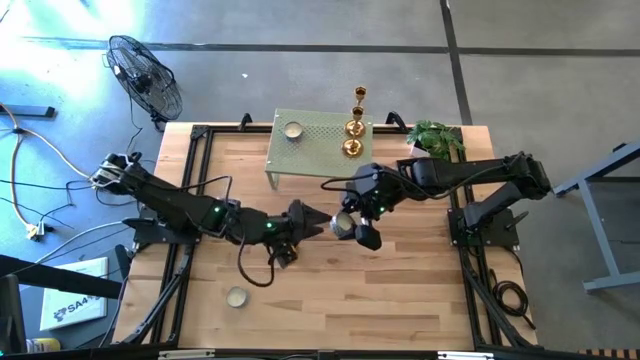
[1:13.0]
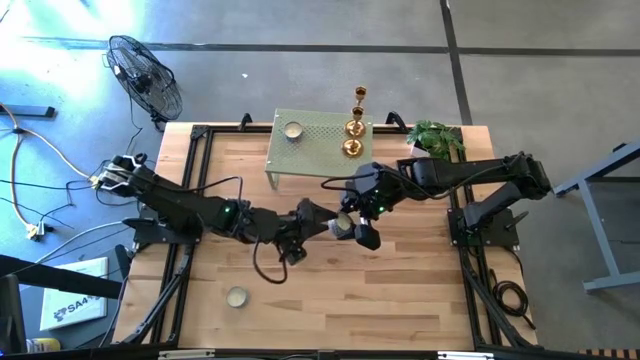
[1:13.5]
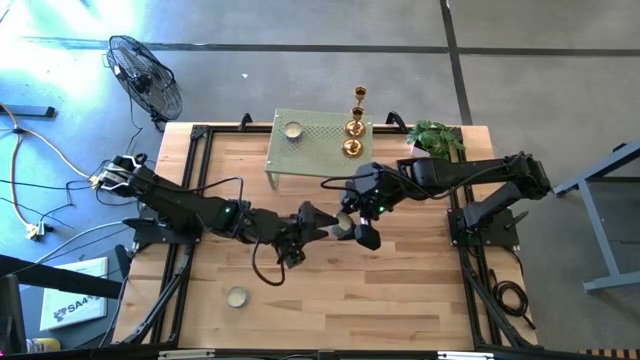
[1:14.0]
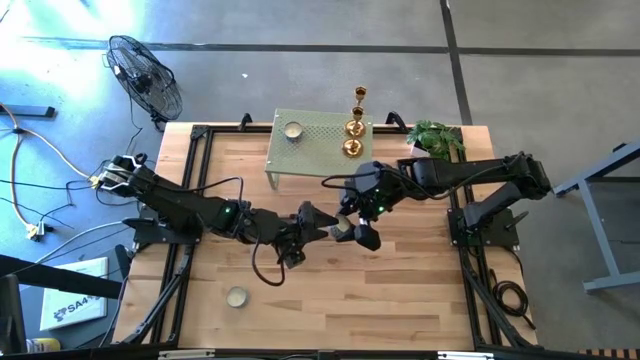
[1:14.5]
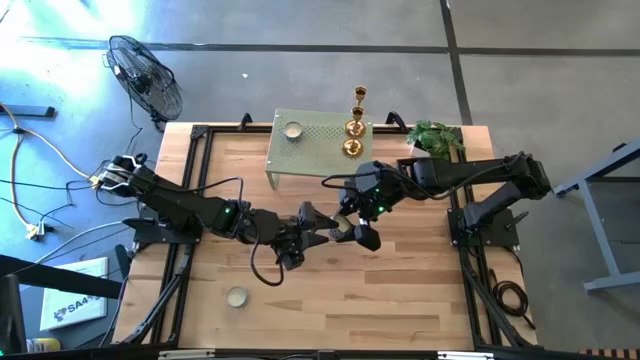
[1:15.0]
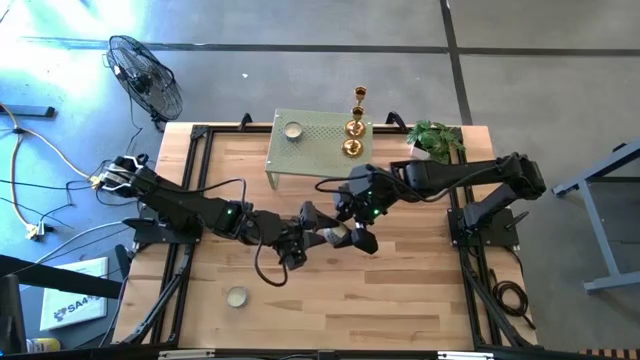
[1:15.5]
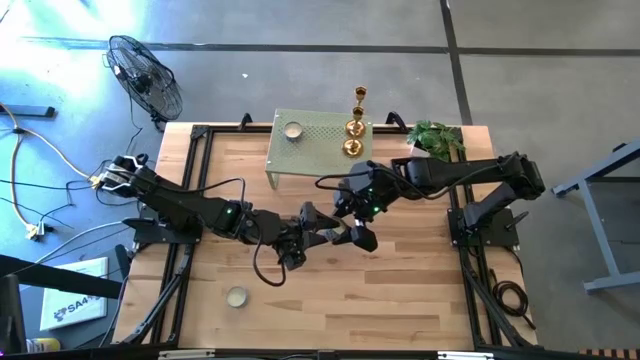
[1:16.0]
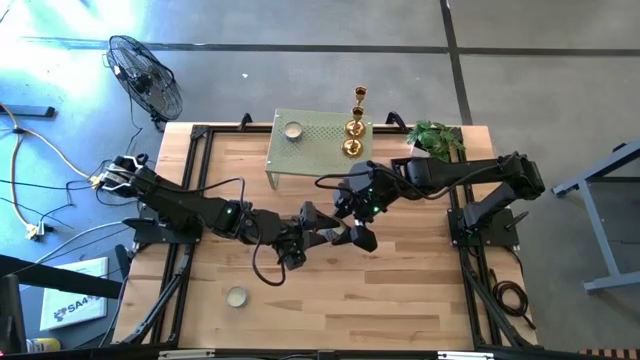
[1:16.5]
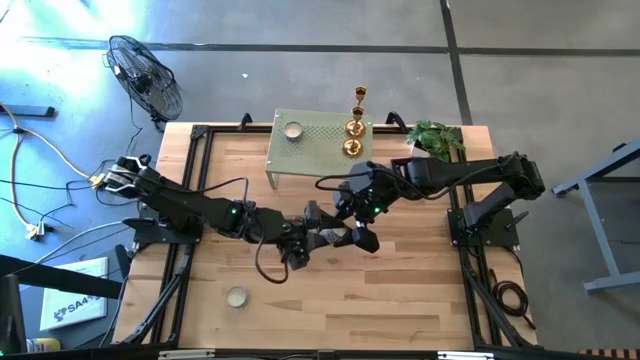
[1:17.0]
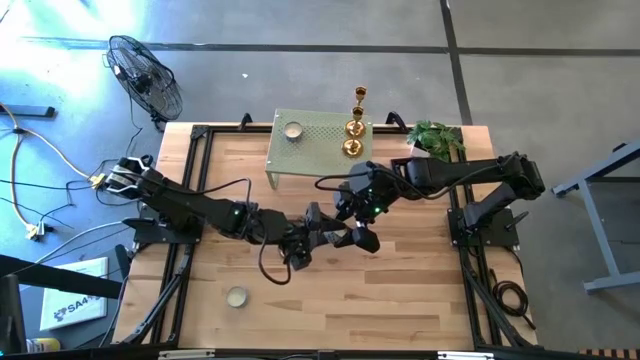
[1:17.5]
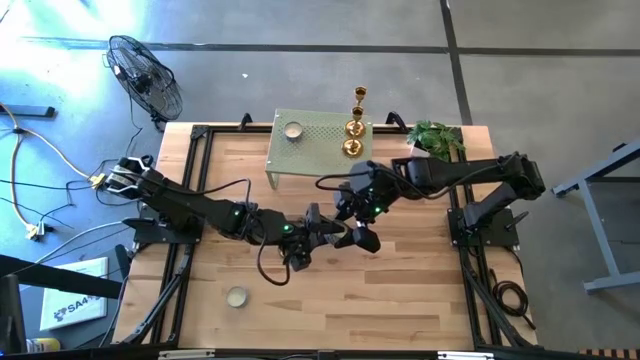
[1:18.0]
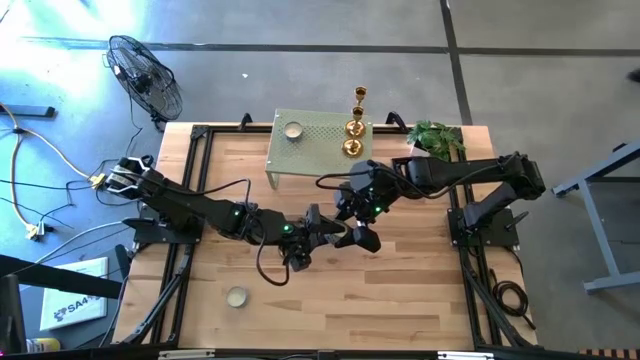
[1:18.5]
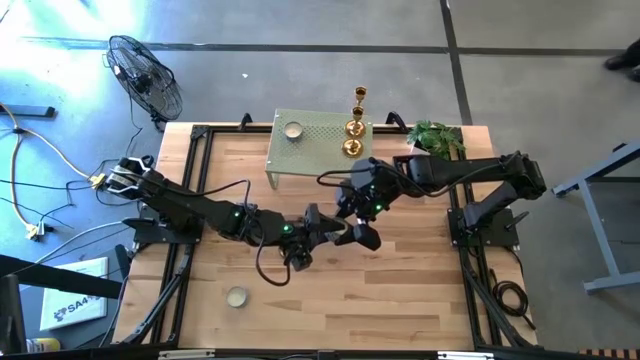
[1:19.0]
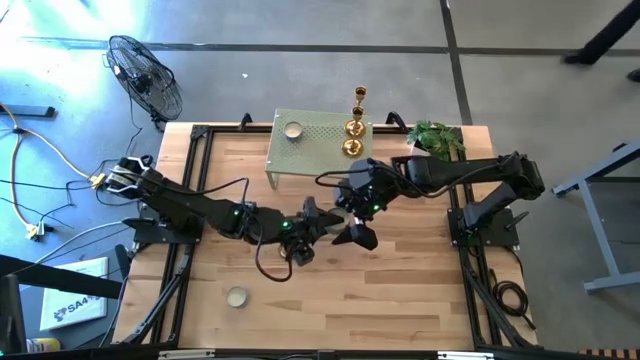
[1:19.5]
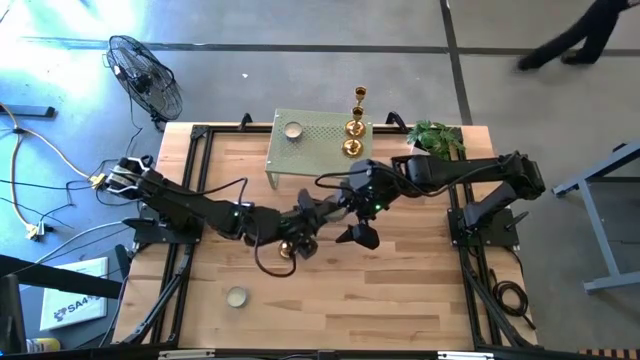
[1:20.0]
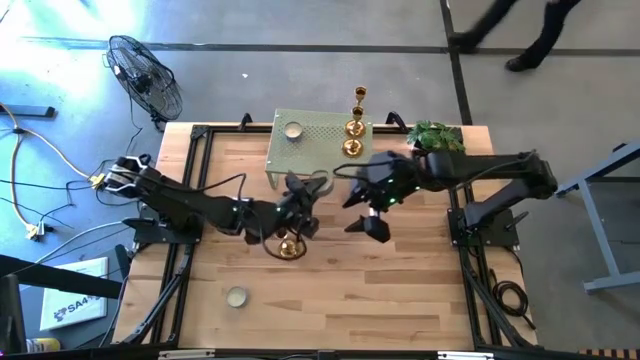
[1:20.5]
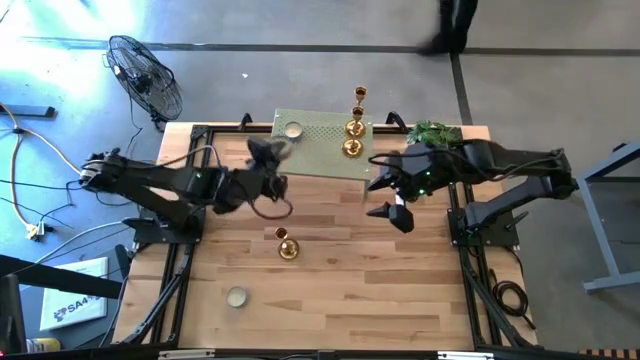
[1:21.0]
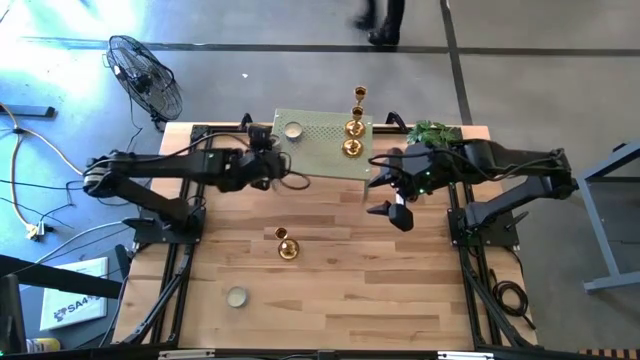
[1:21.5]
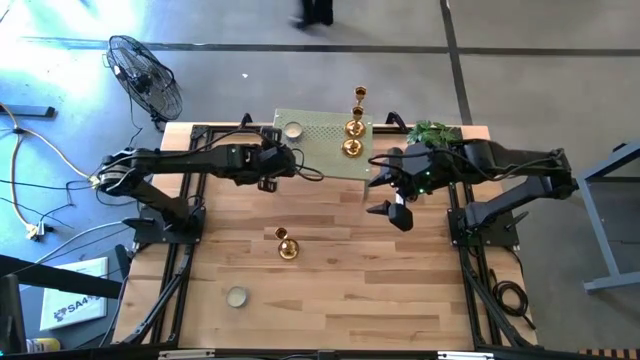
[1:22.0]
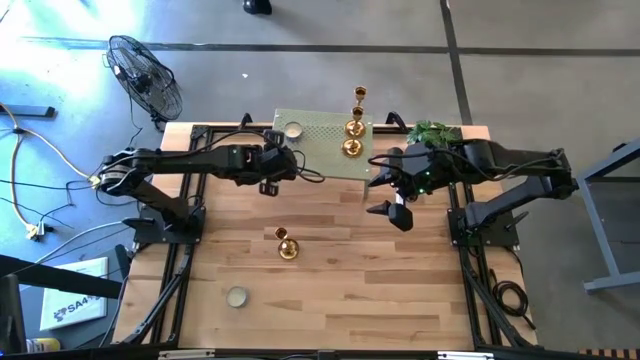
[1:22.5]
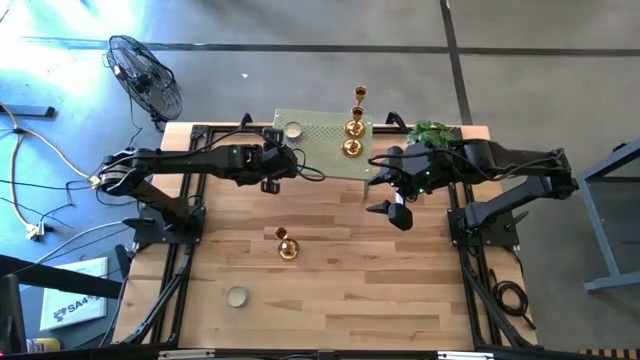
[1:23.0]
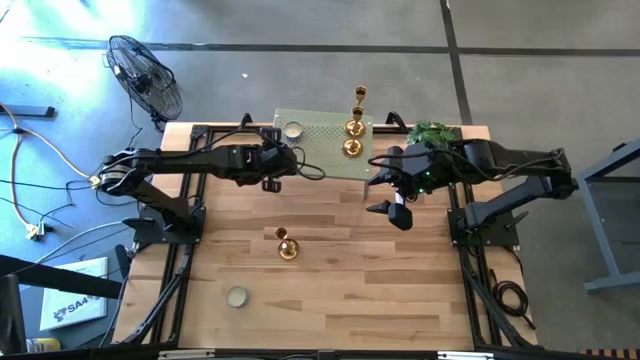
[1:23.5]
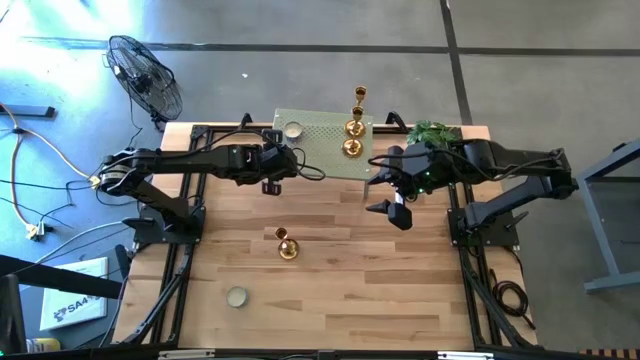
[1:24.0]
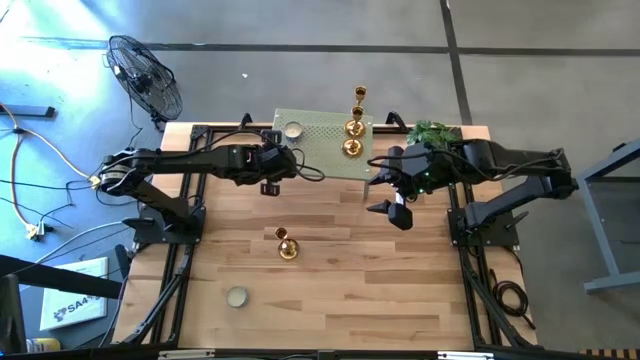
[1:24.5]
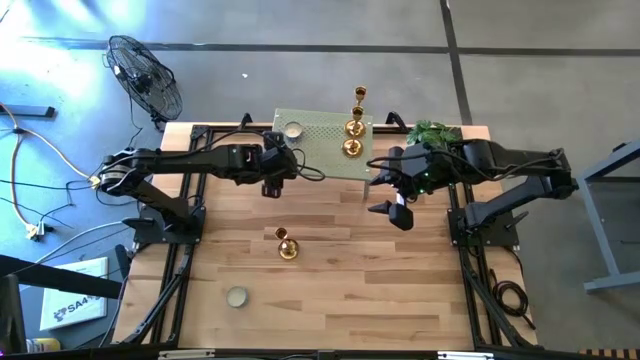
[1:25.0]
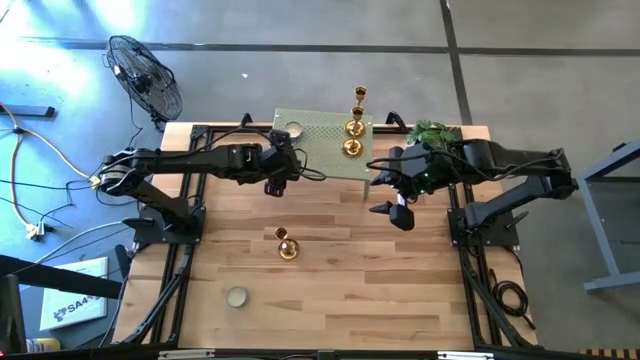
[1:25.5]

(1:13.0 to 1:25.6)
Task: Stock candles and holders on shelf
Align the right light blue scented candle with the other scented candle on the shelf

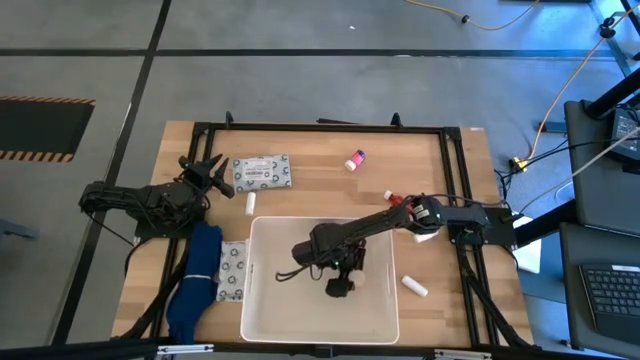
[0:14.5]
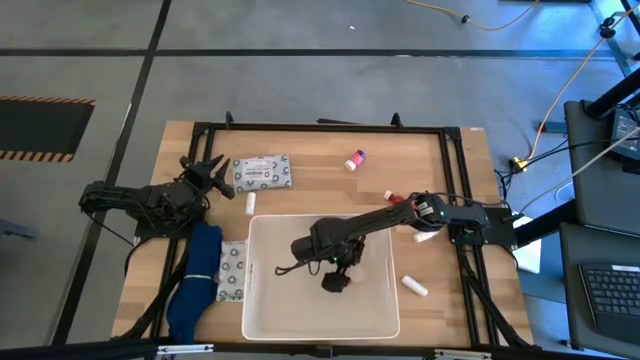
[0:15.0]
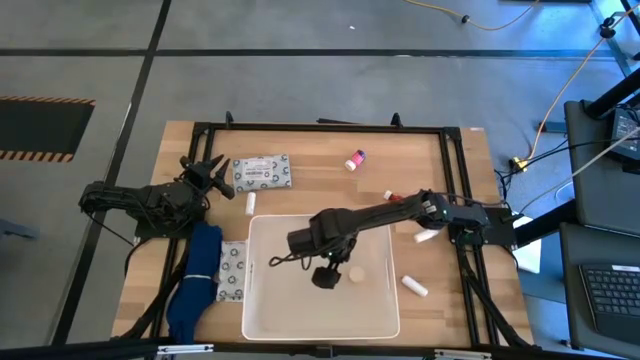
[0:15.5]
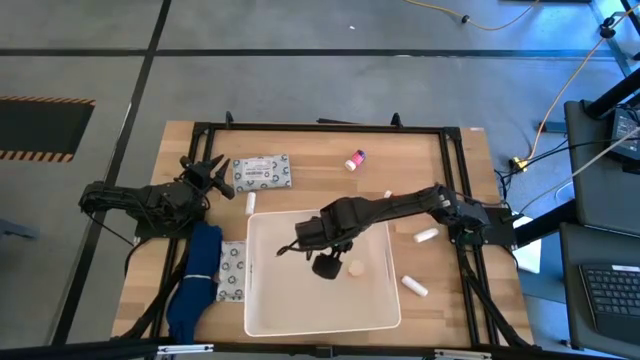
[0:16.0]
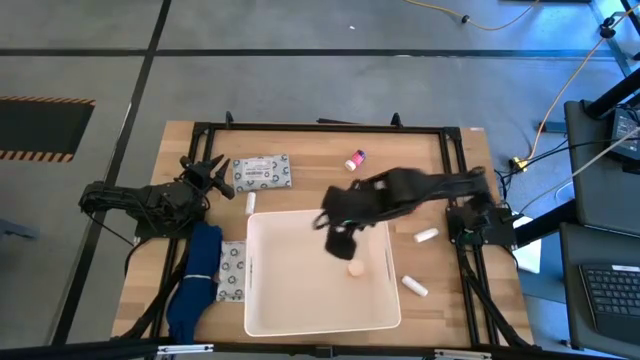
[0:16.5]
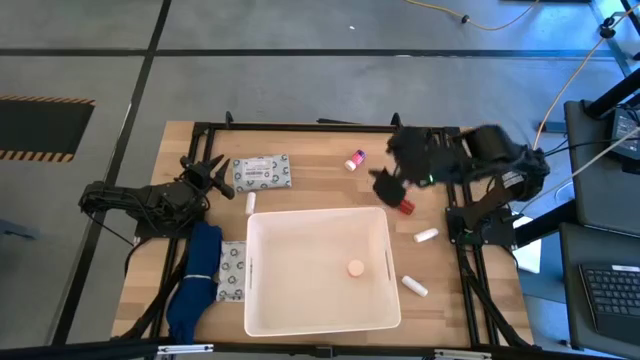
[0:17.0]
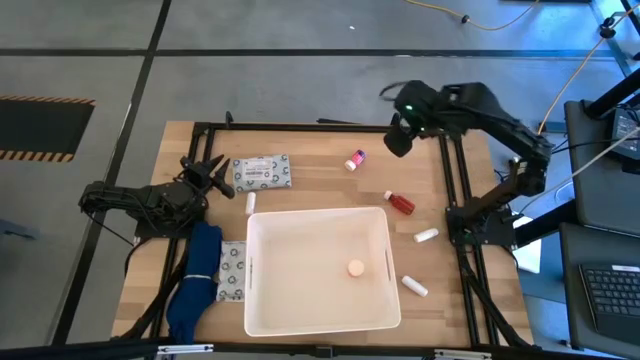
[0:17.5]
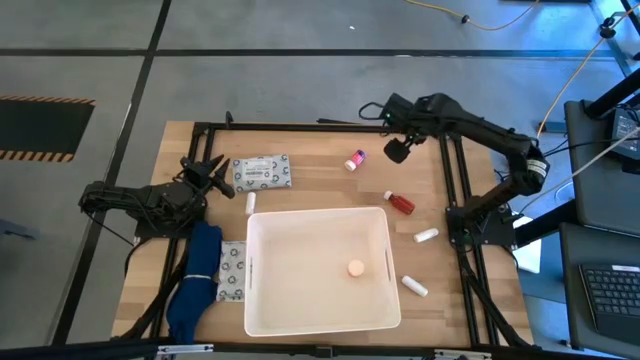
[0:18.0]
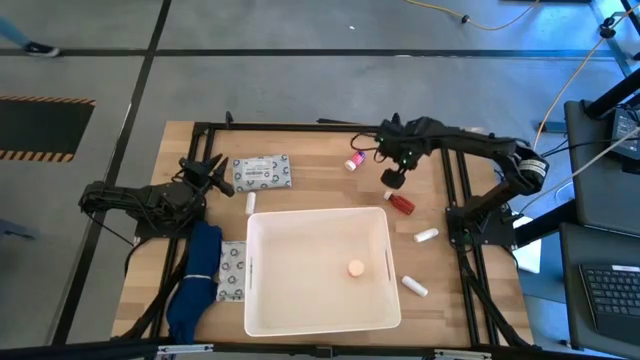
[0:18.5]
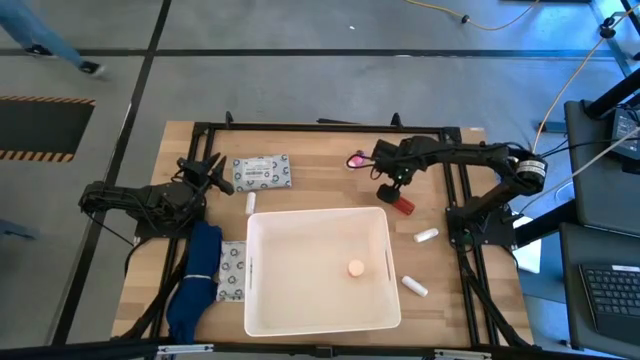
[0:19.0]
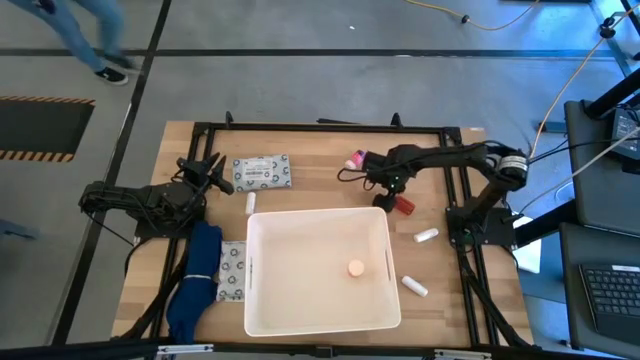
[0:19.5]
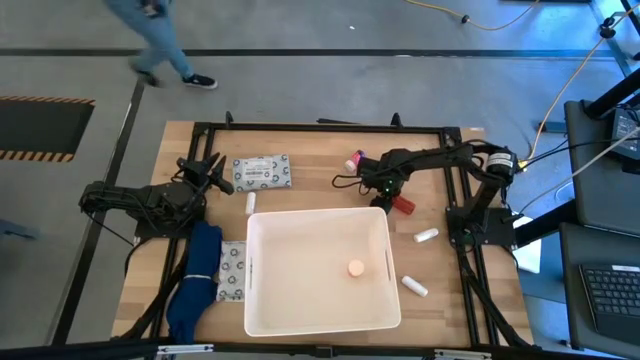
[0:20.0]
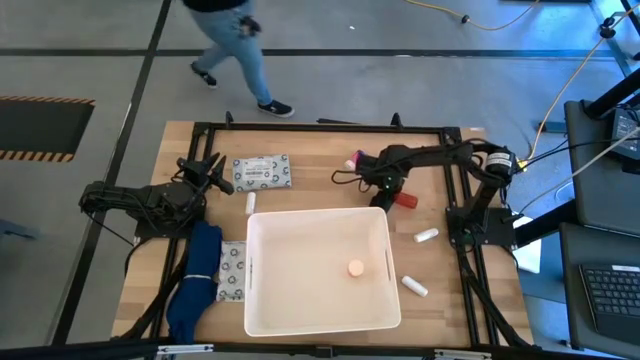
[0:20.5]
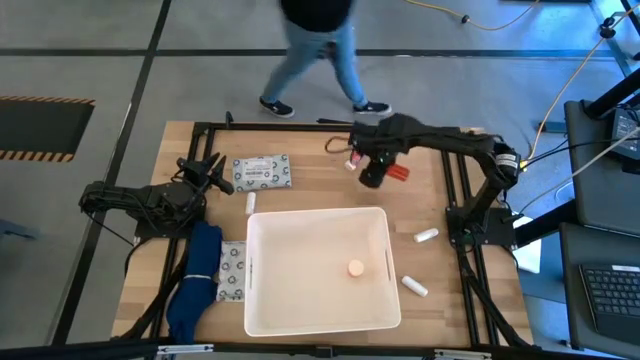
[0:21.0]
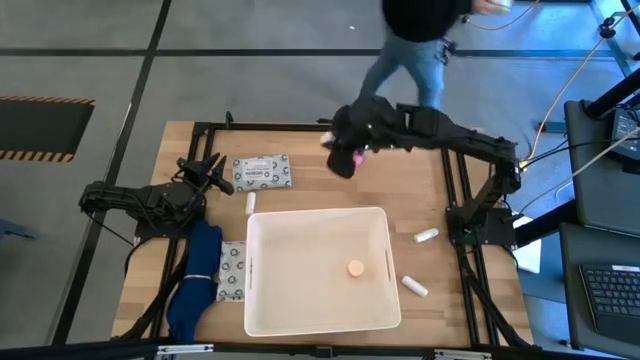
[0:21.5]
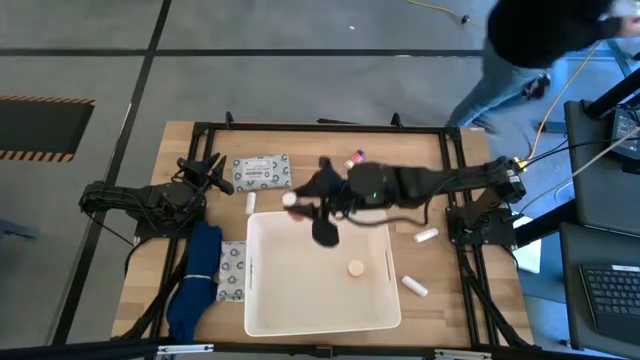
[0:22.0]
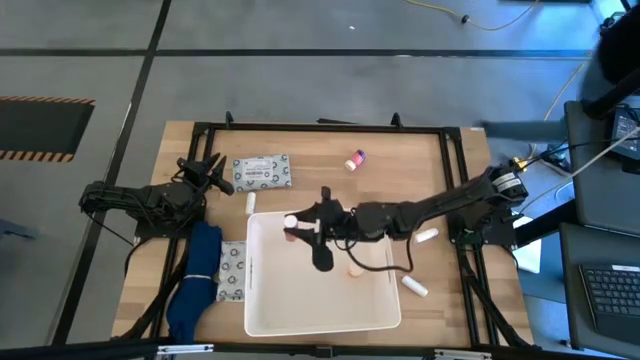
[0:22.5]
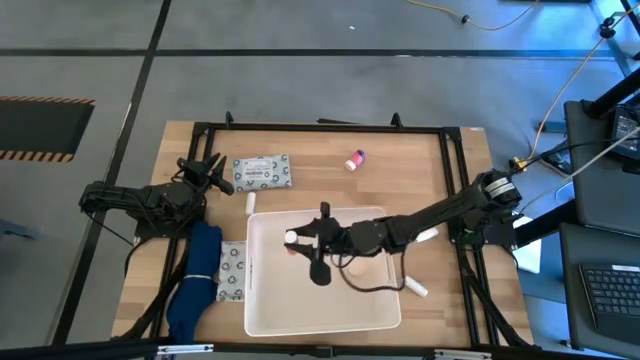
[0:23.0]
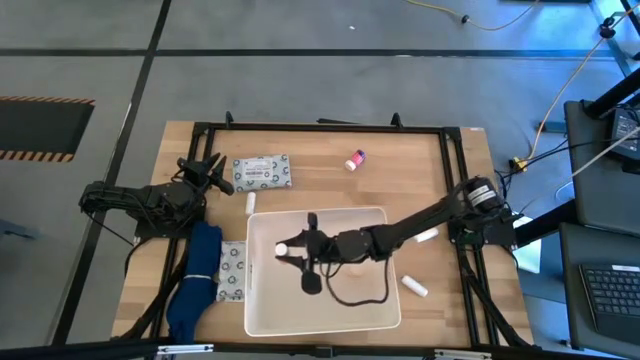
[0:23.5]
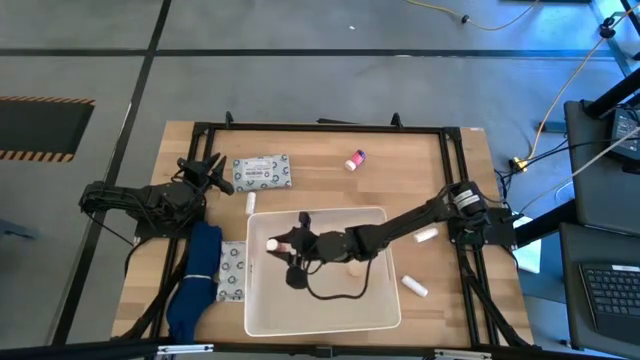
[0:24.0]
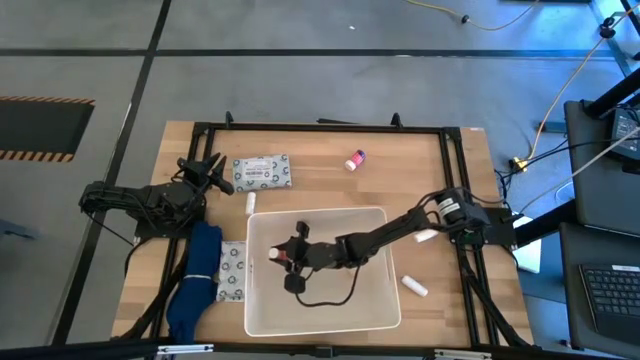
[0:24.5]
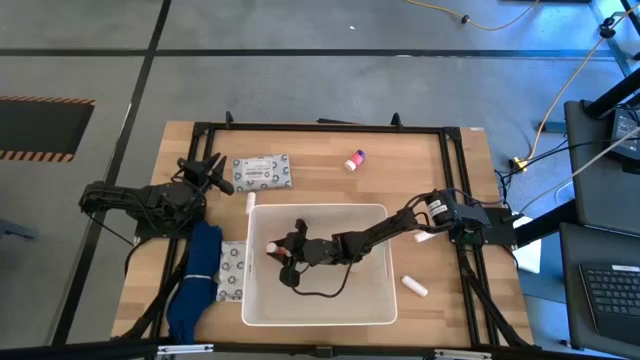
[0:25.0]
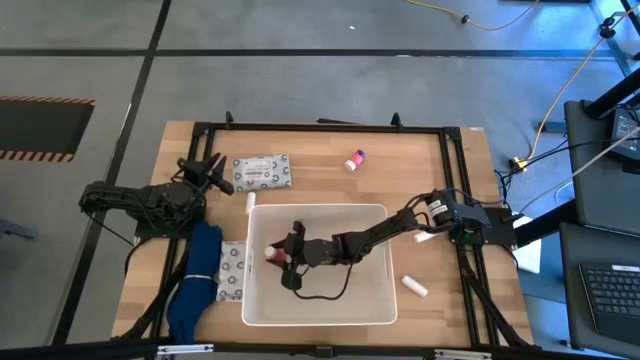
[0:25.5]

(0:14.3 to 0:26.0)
Task: Pick & place medical supplies in basket/bin
Put the red pill bottle into the white bin
